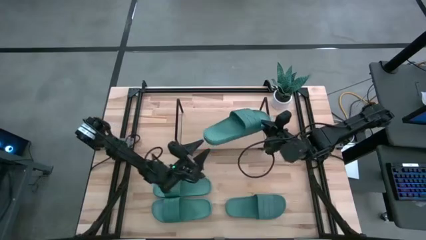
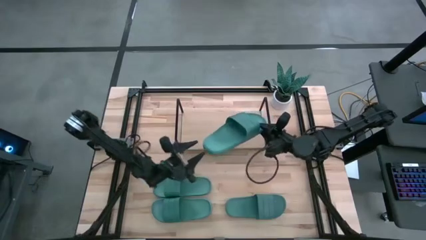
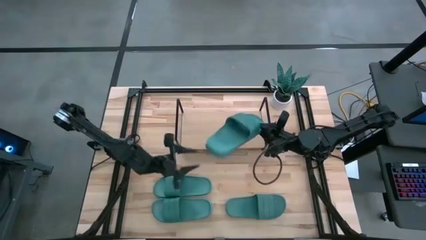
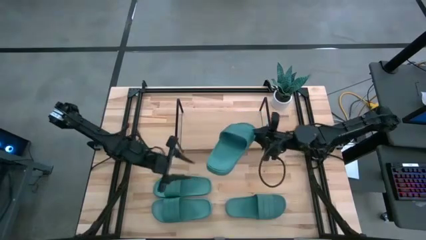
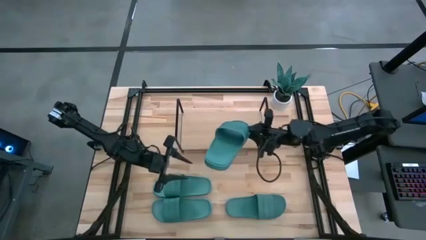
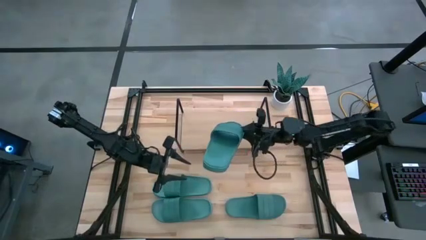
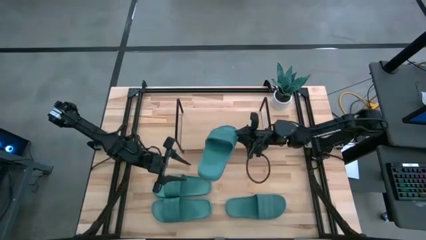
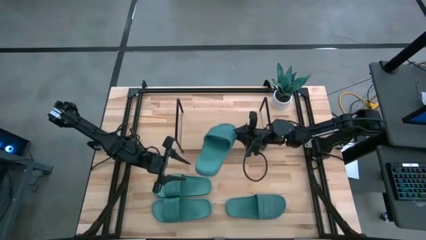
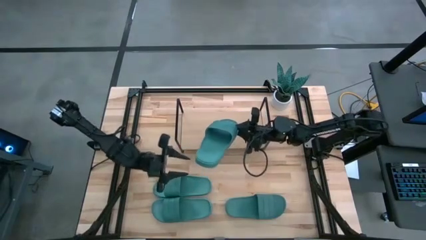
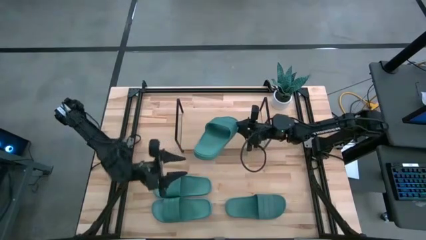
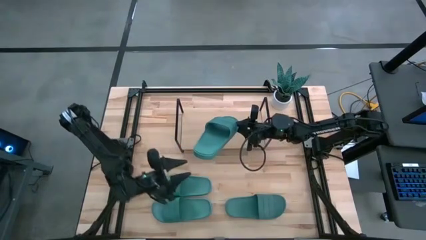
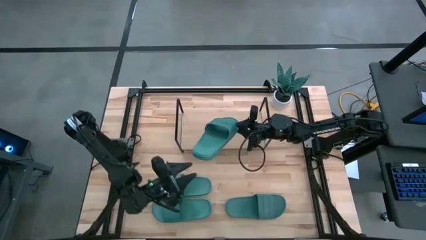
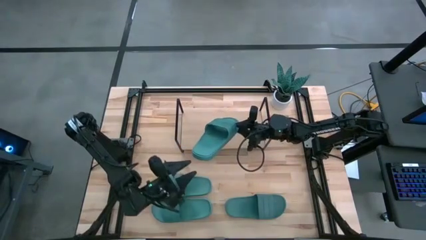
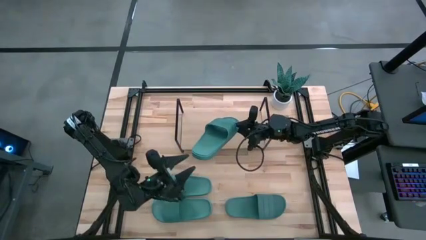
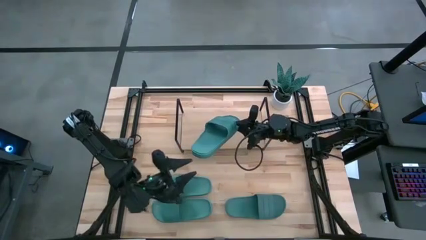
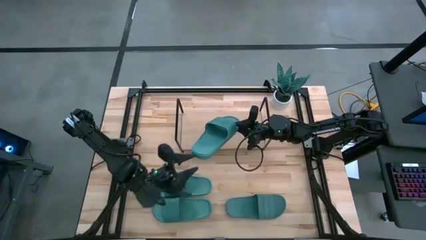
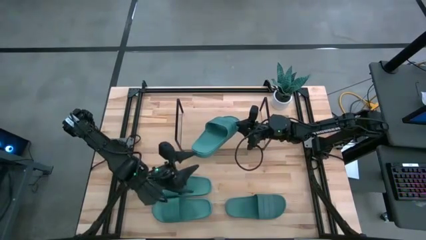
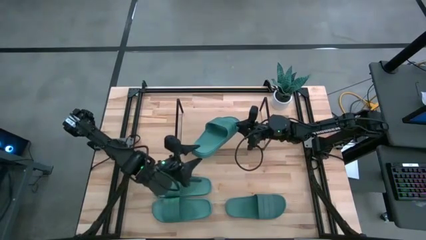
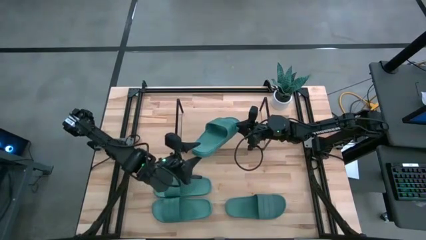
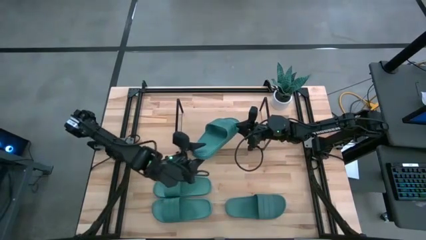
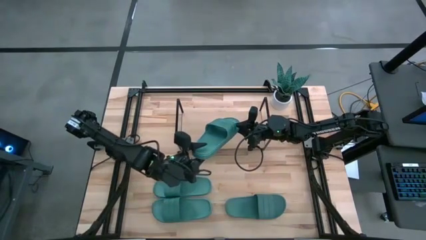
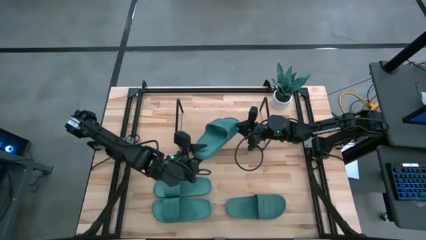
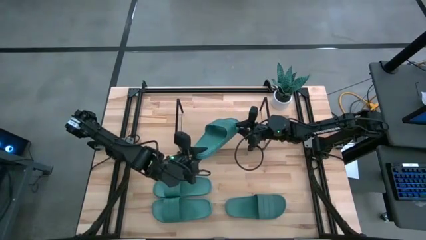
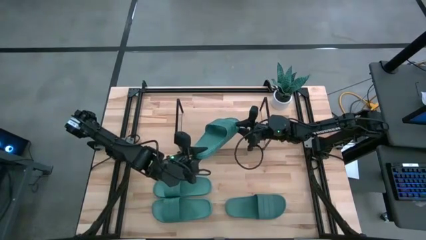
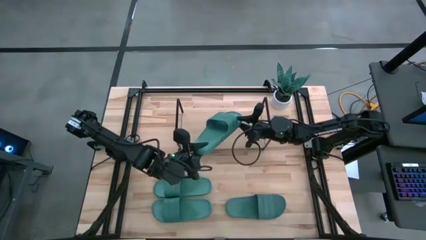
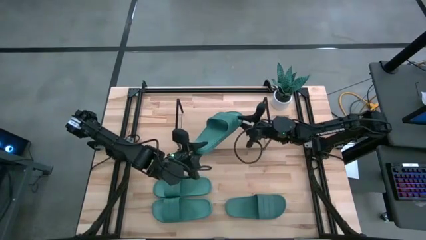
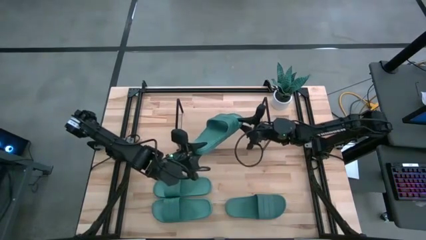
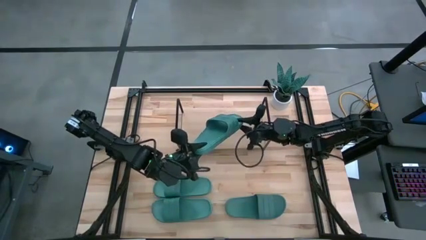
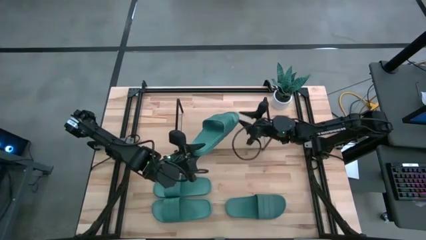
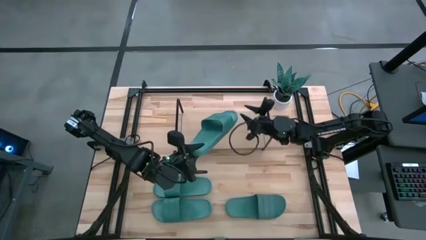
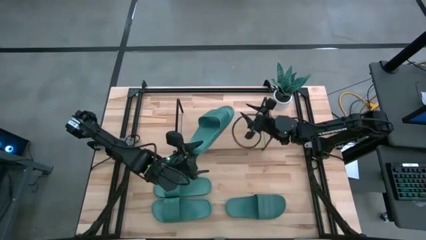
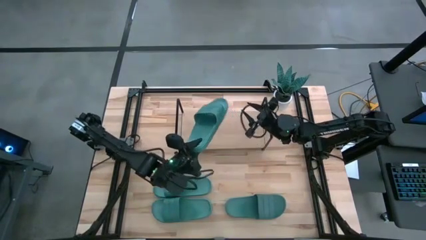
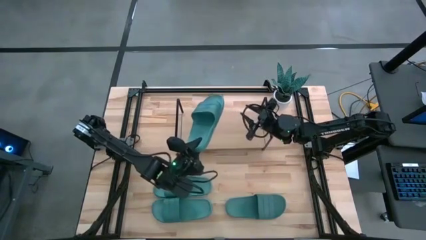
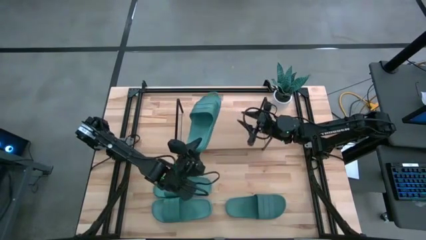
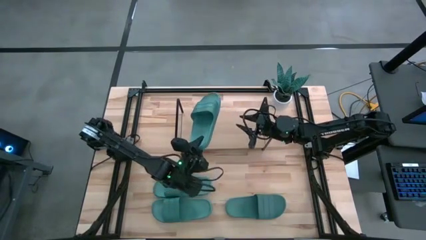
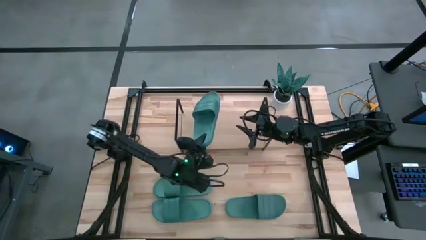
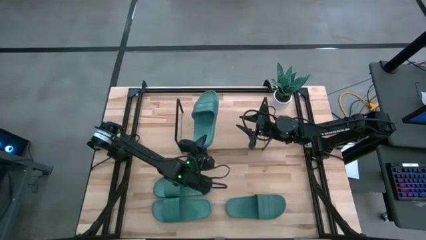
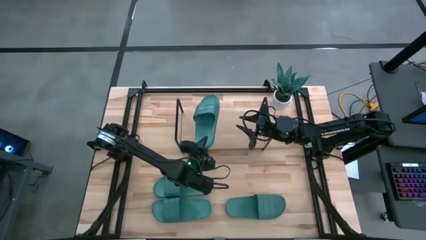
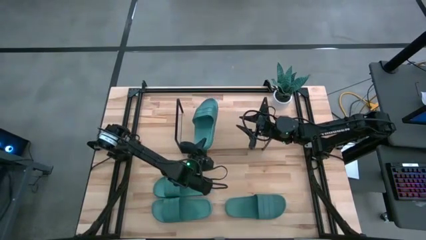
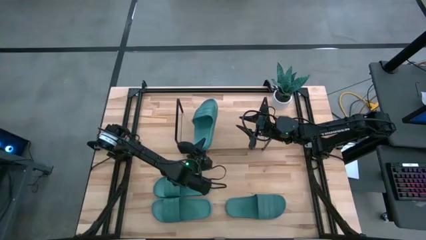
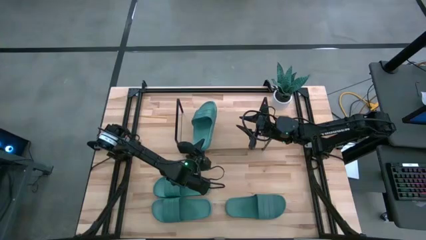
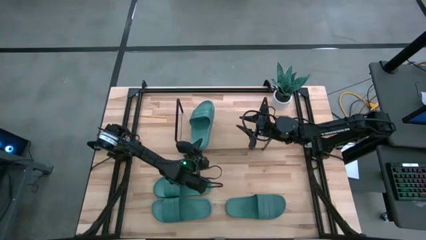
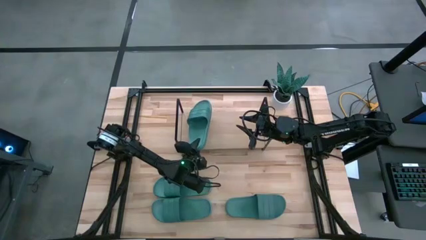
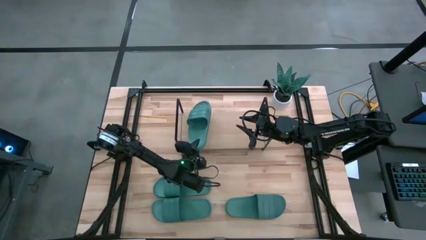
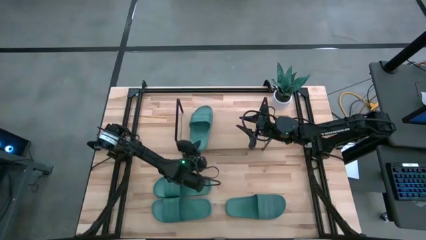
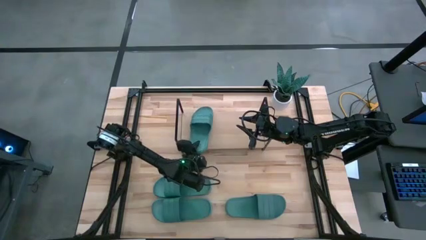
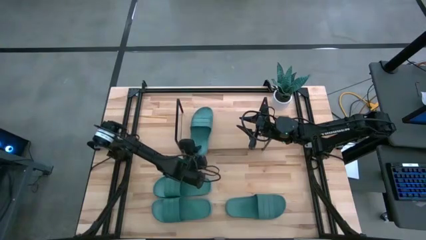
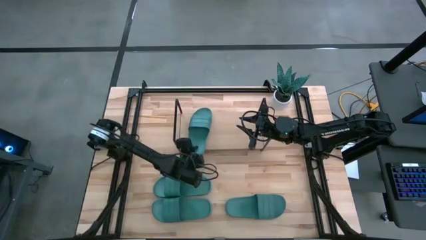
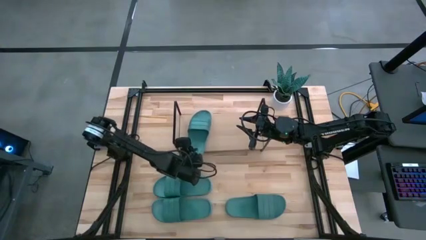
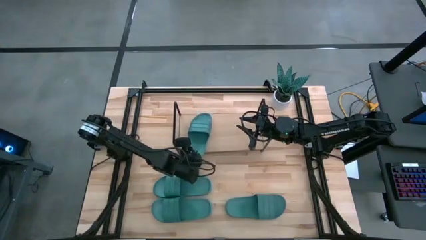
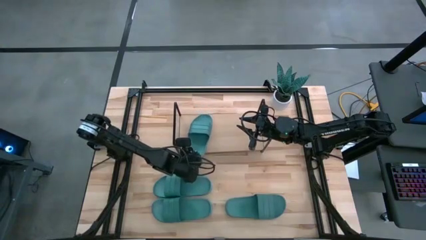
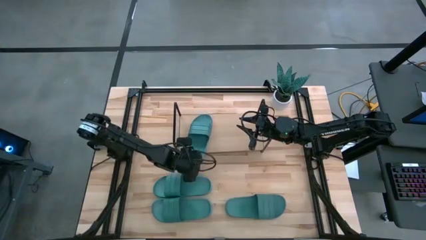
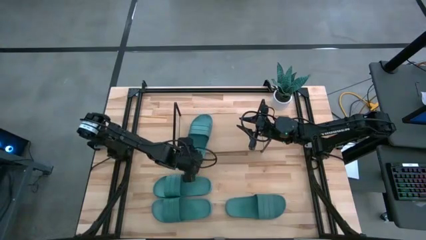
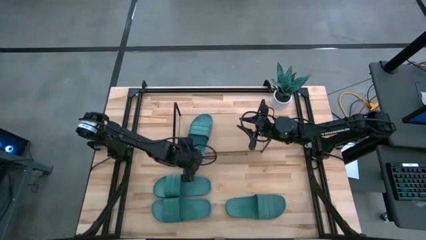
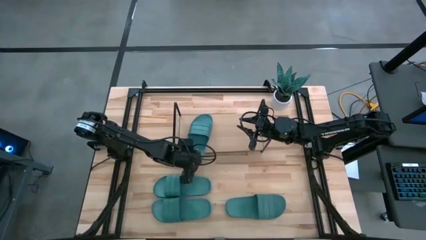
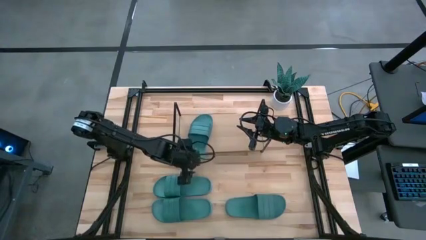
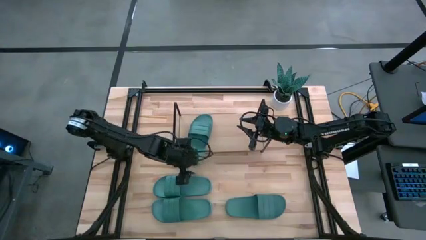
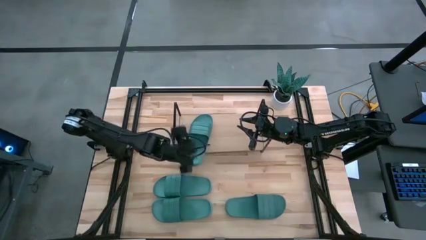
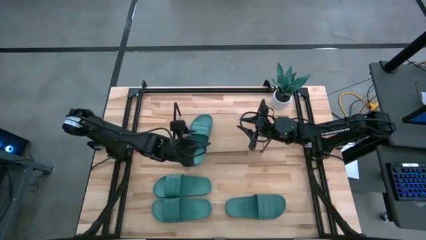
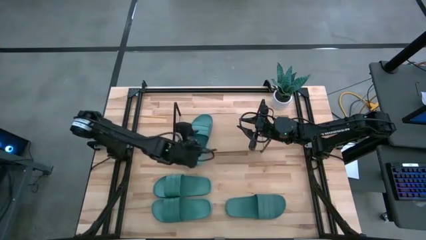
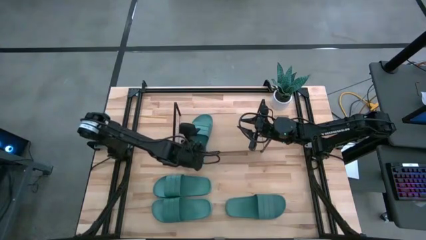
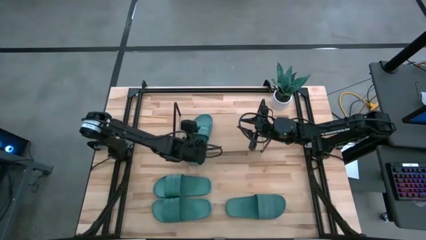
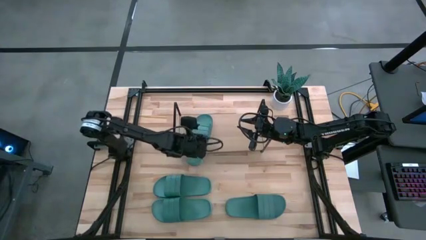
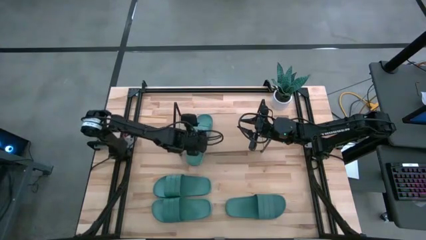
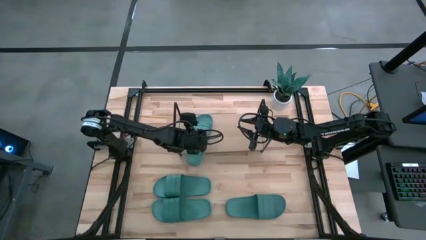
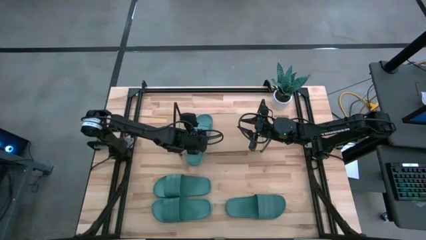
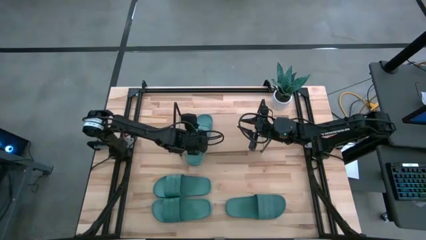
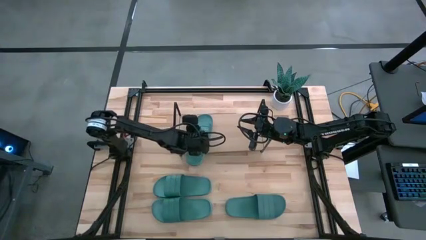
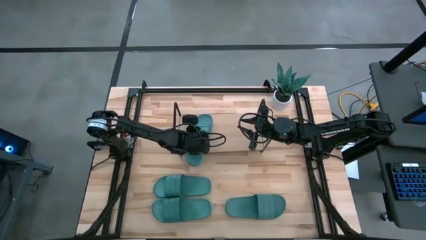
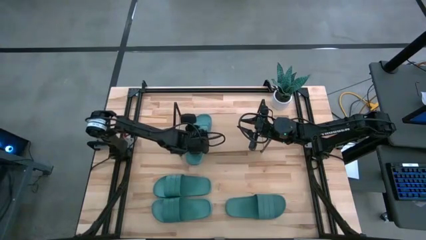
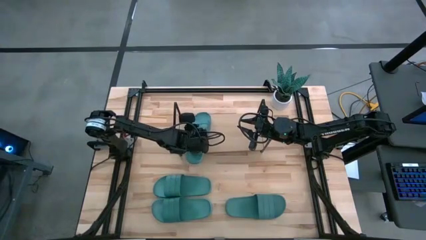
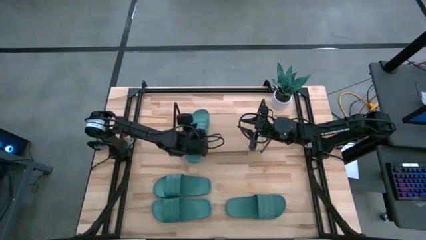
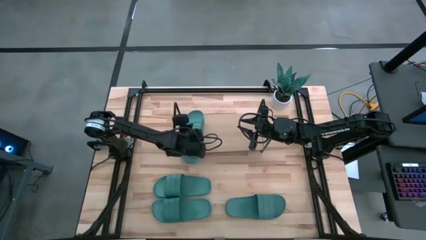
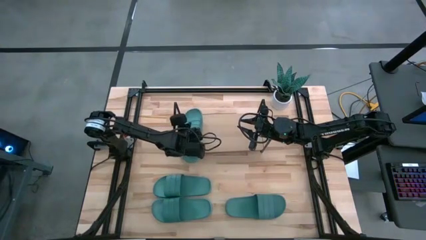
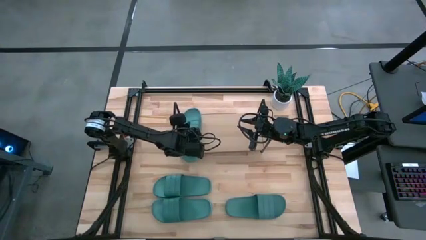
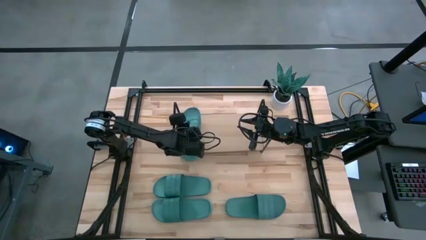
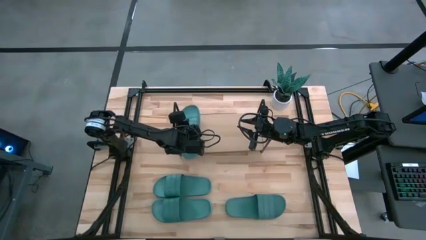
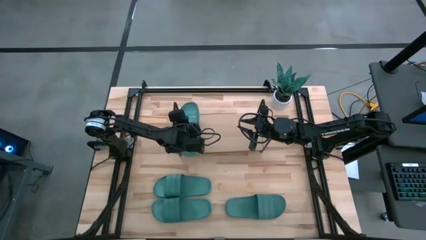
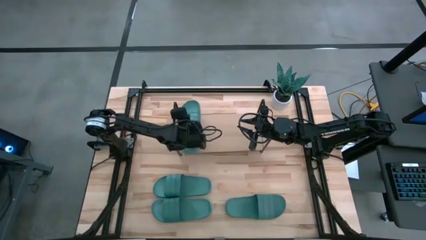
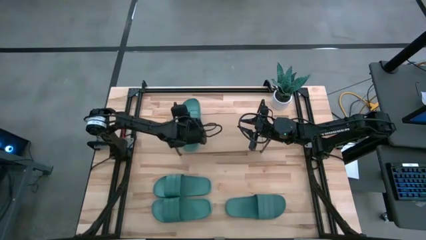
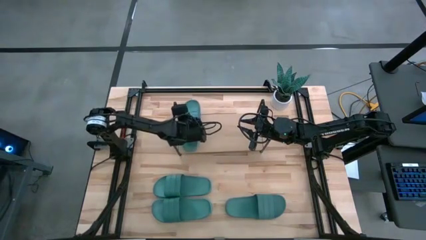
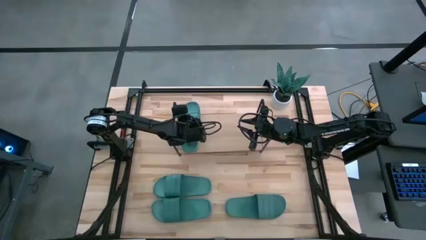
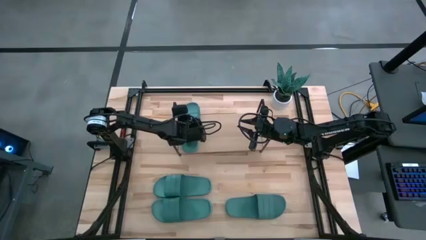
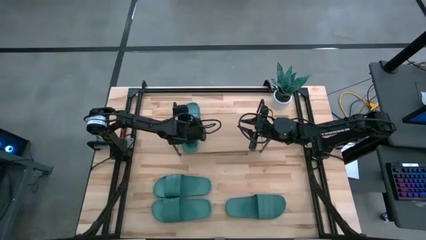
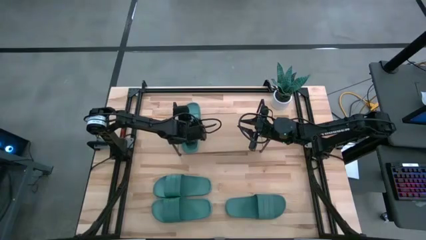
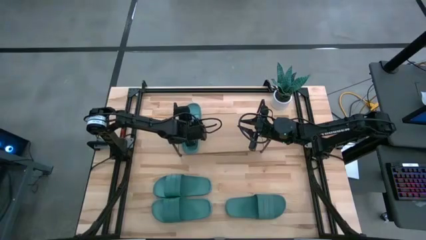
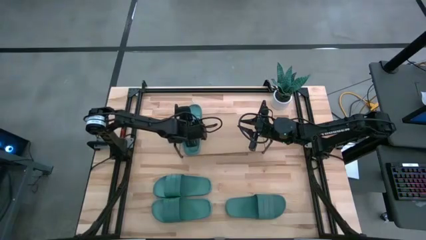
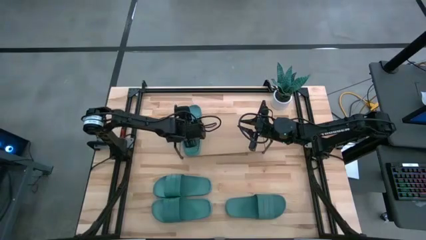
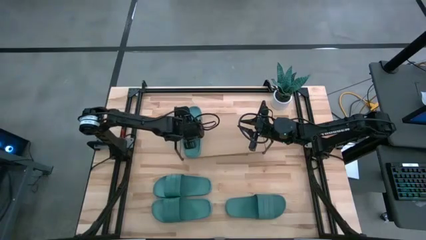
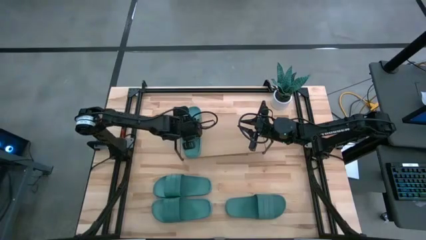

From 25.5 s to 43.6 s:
Task: Pick and place slides into the shelf
Put the green slipper on the shelf
